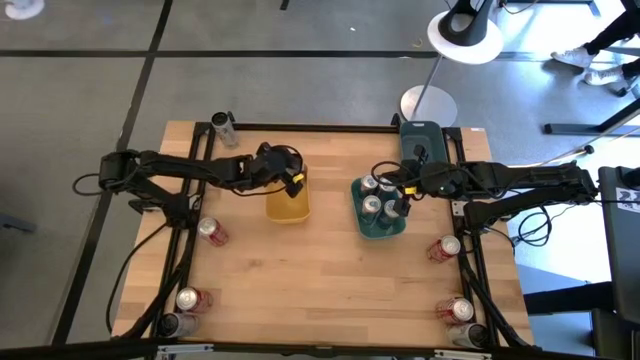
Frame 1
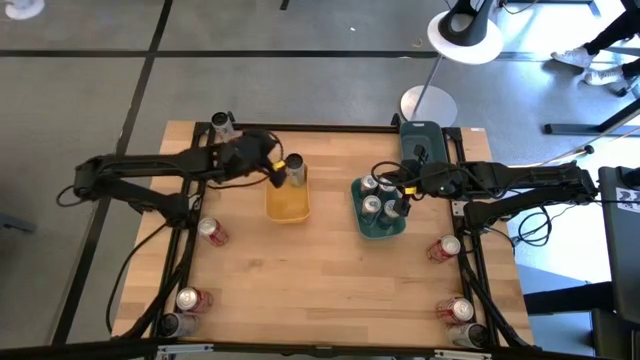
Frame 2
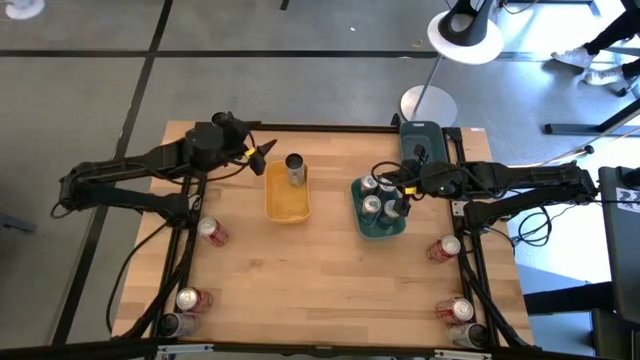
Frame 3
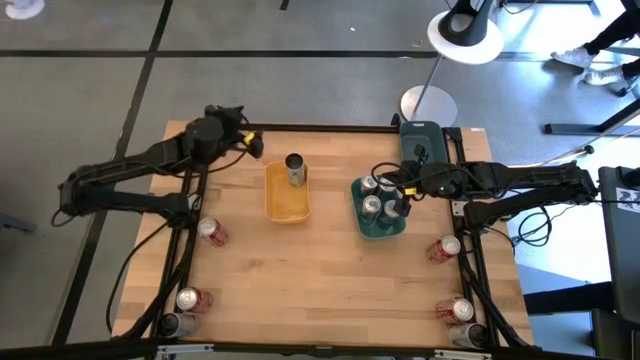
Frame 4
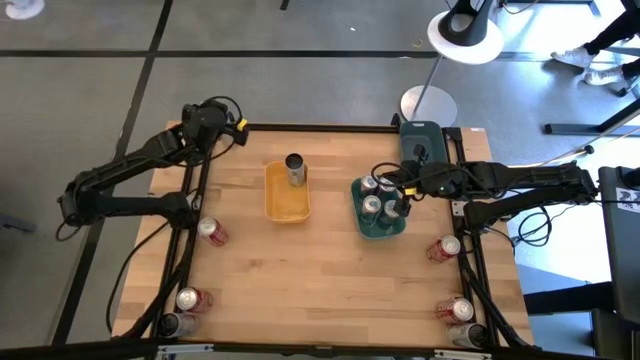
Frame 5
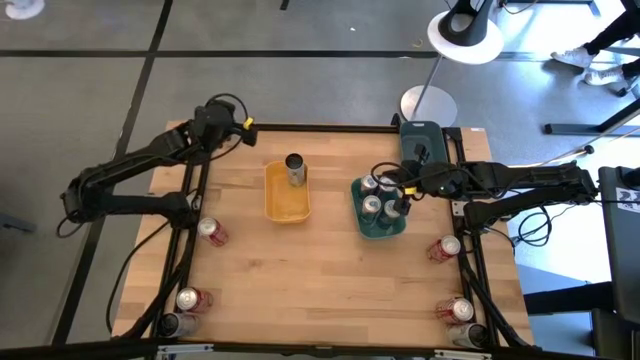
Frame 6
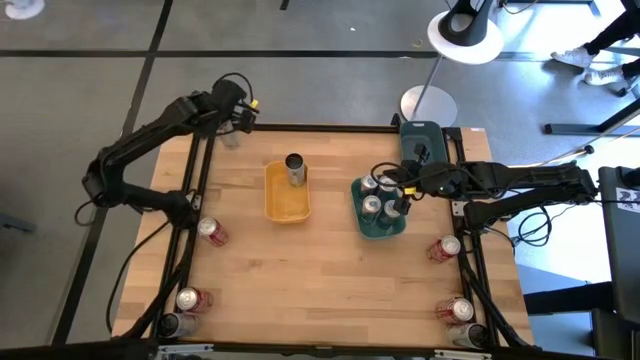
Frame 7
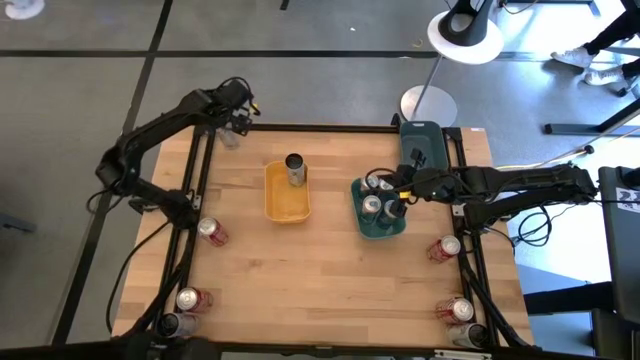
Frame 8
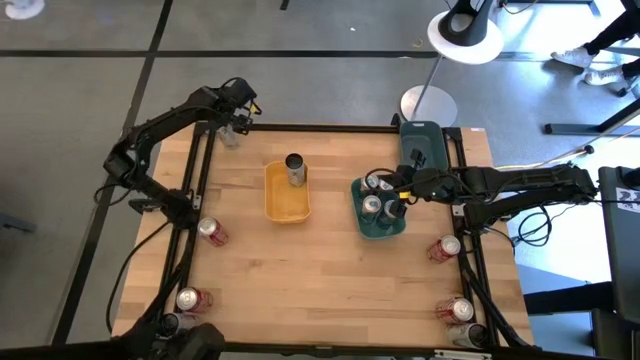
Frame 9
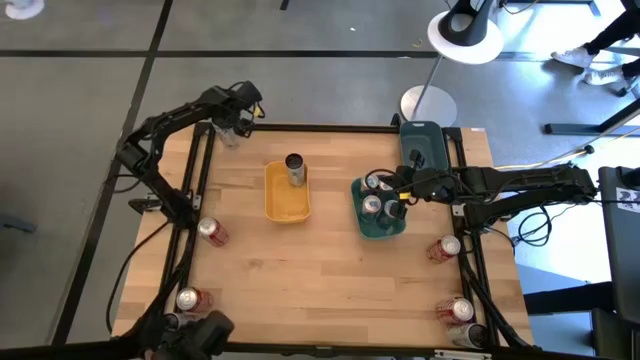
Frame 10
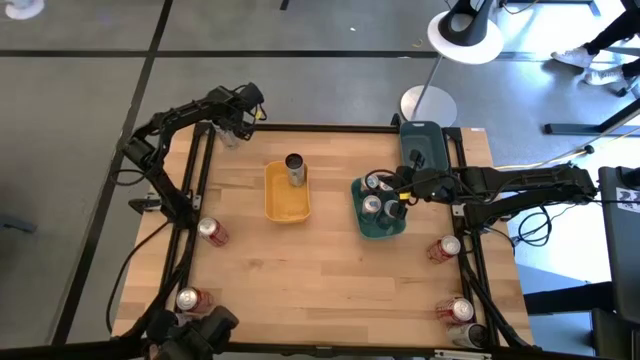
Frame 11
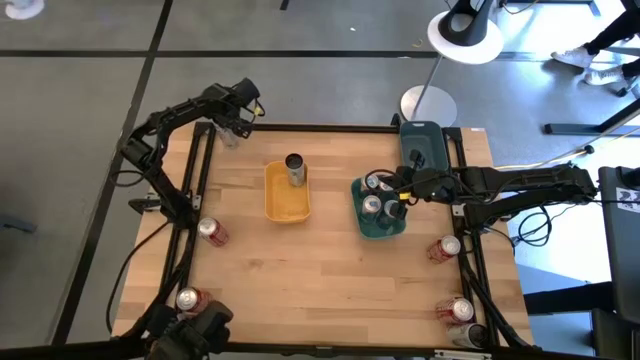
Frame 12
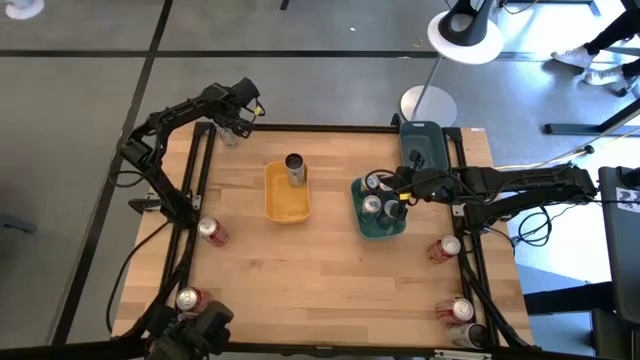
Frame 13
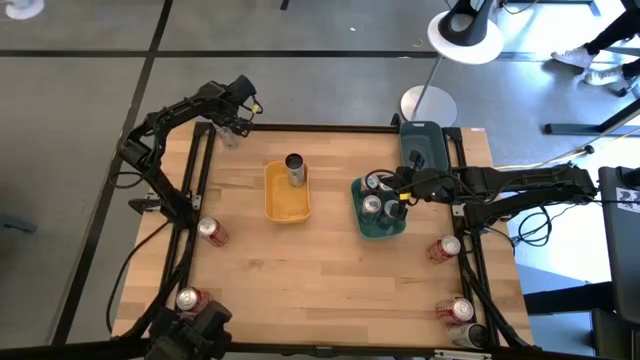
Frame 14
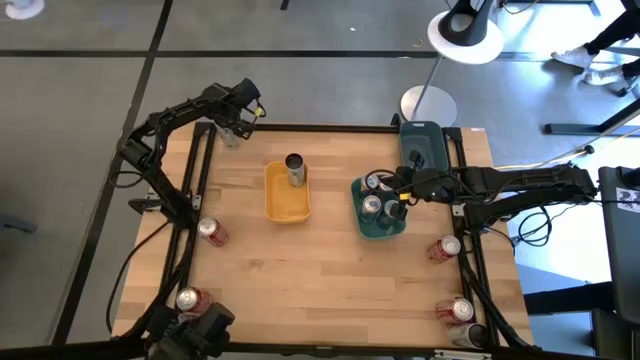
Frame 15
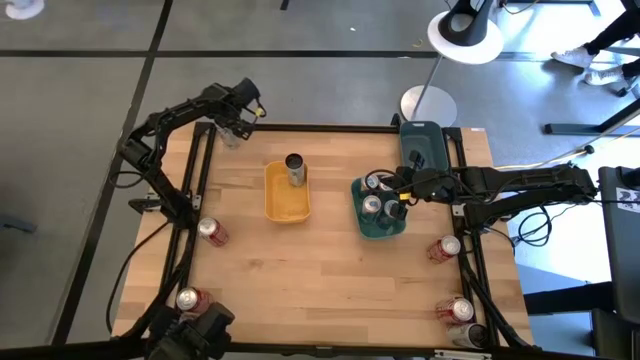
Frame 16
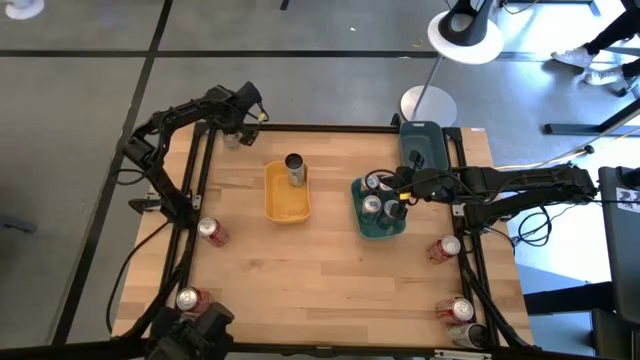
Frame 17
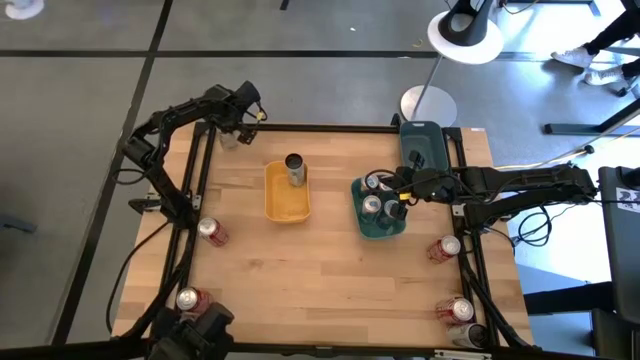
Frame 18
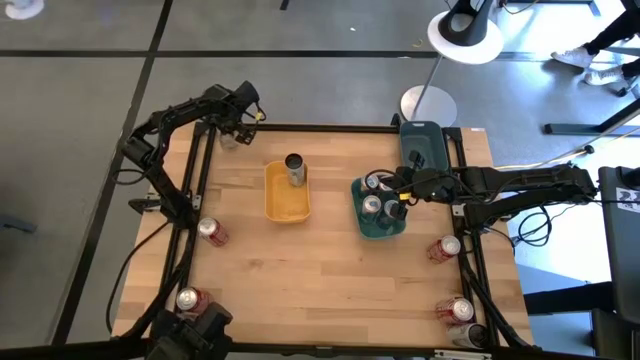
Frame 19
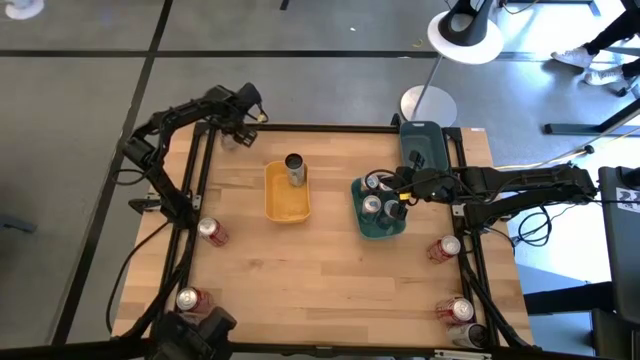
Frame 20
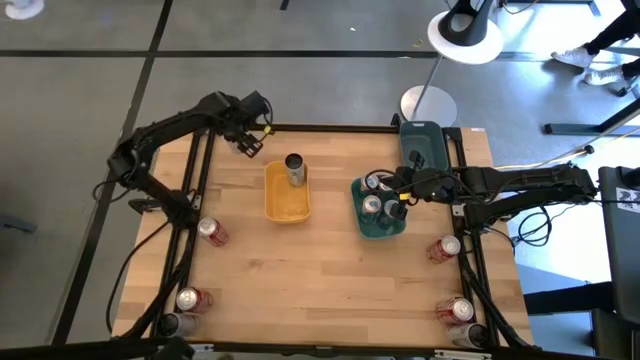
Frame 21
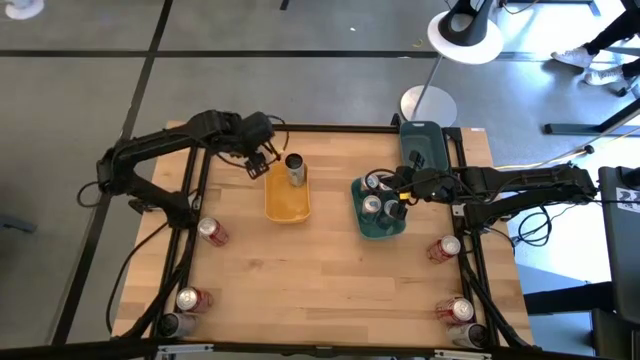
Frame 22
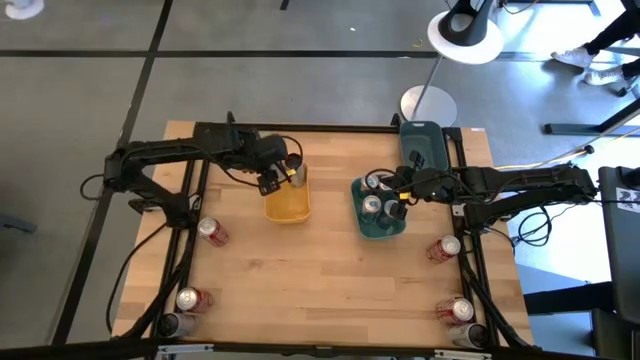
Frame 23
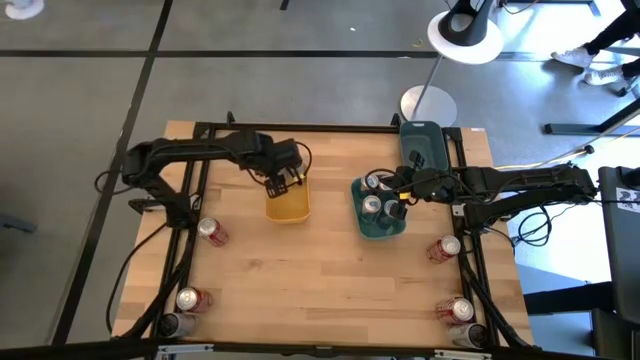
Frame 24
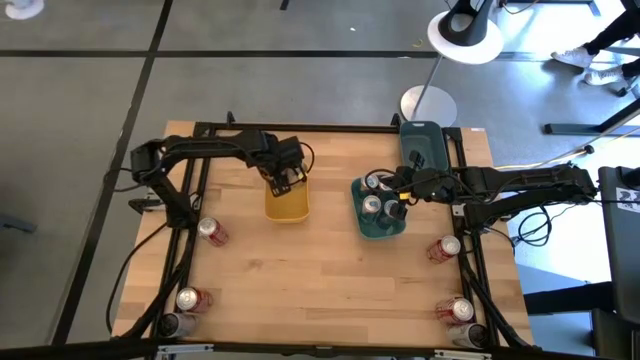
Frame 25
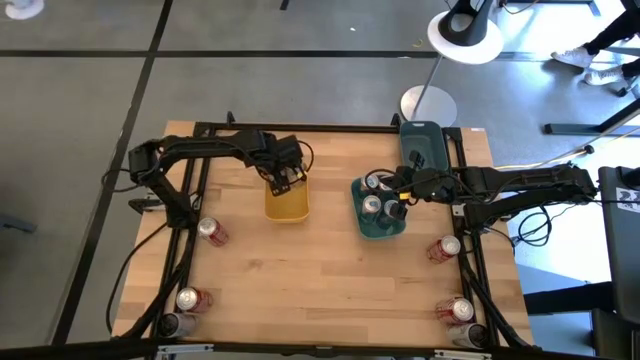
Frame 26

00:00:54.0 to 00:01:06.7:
Task: Sort soda cans
Put the top white-pink soda can into the yellow bin

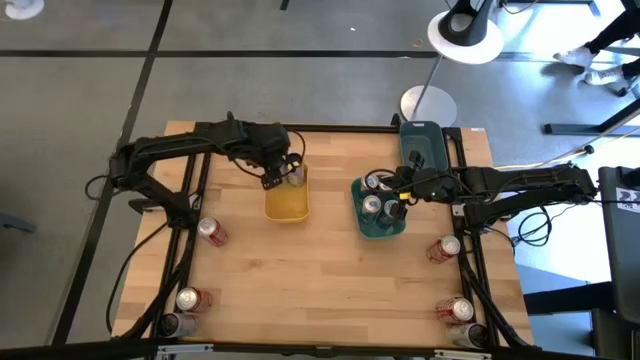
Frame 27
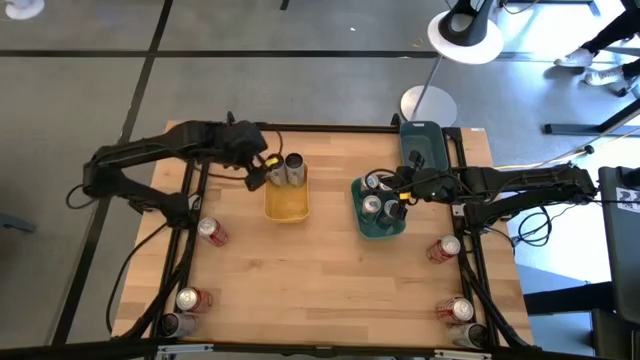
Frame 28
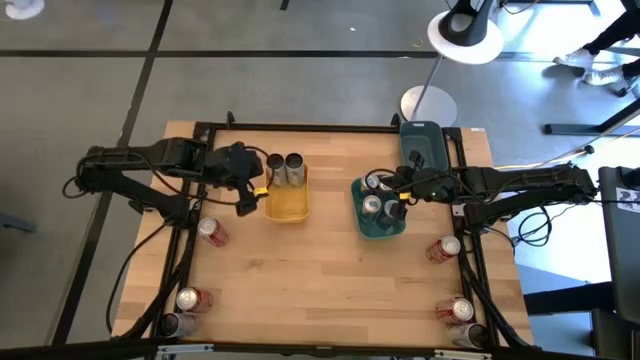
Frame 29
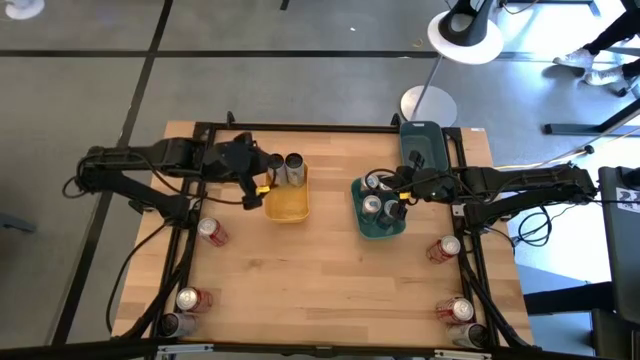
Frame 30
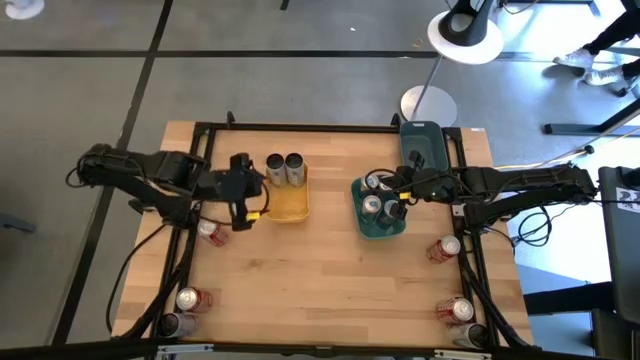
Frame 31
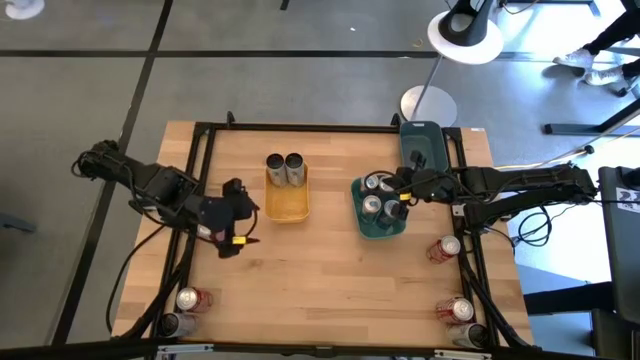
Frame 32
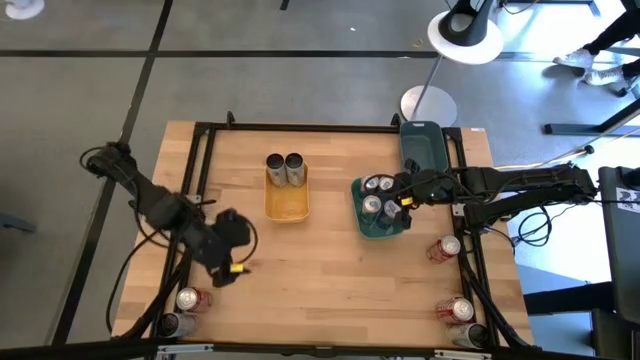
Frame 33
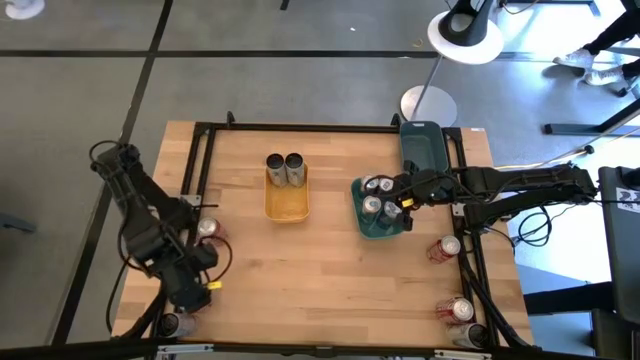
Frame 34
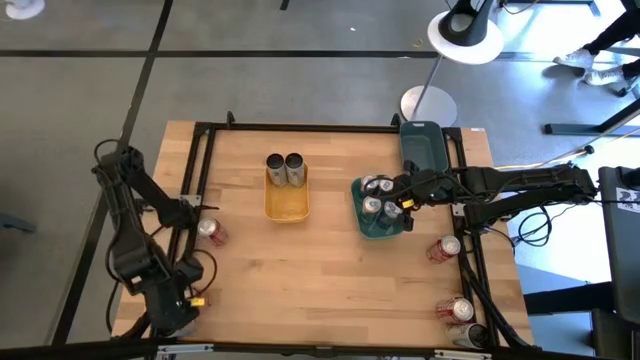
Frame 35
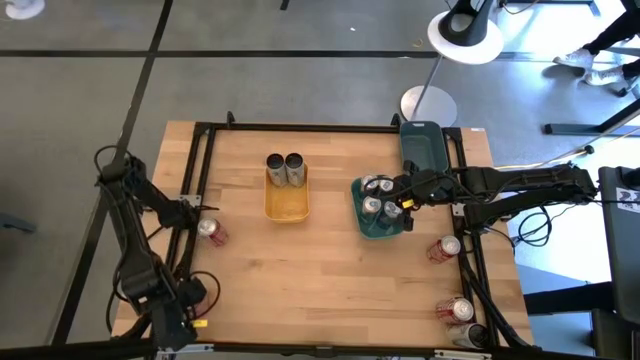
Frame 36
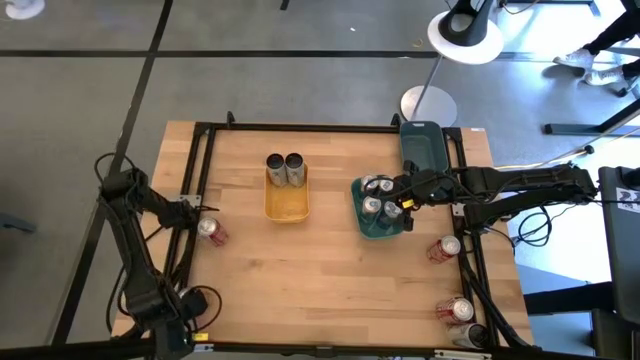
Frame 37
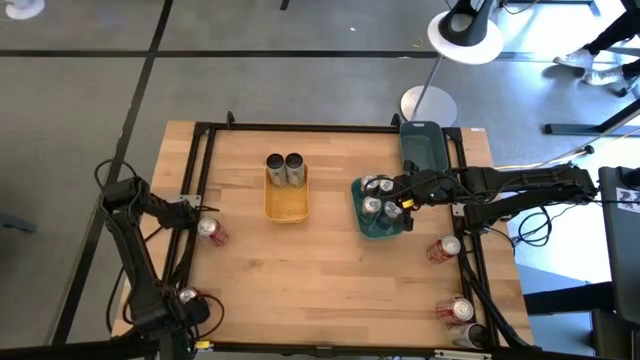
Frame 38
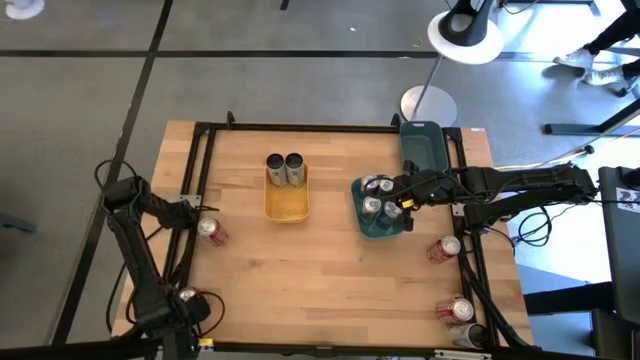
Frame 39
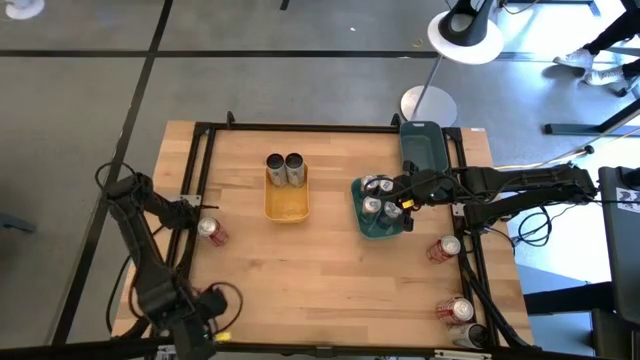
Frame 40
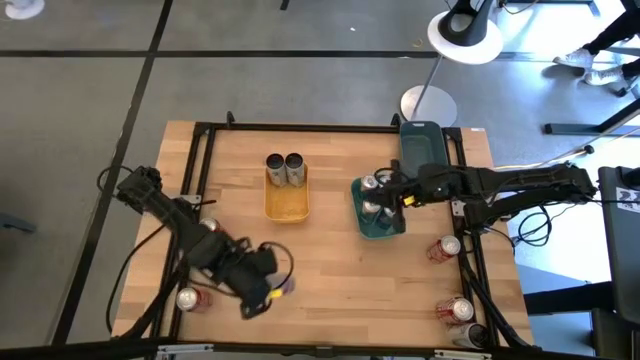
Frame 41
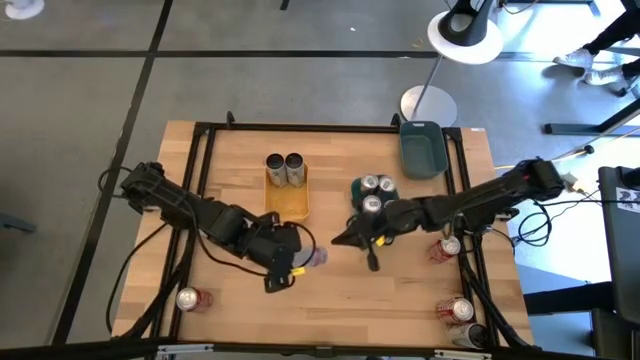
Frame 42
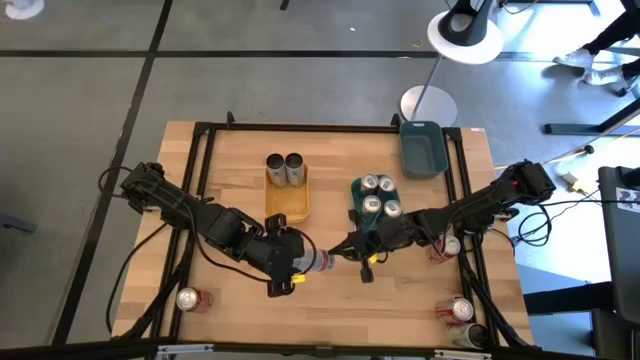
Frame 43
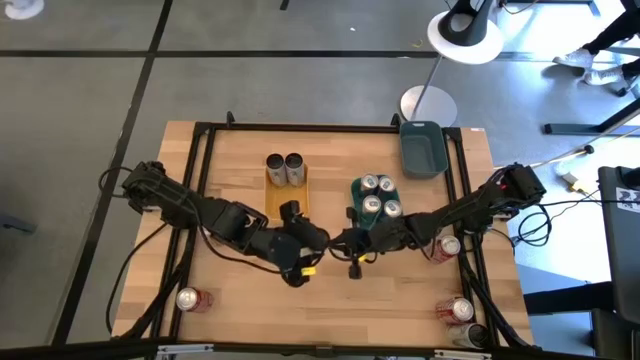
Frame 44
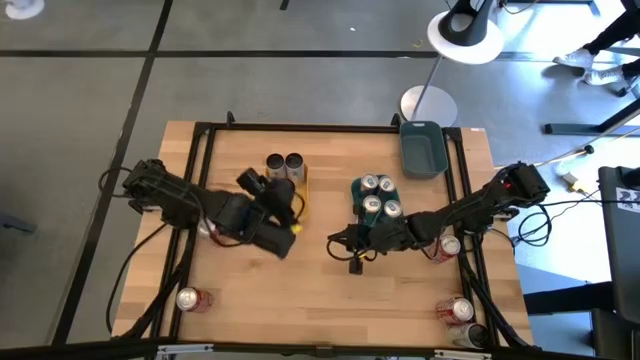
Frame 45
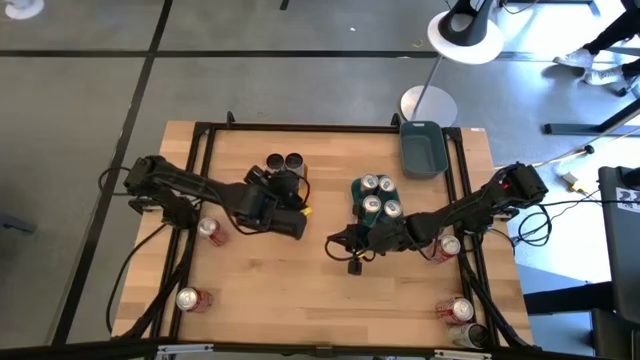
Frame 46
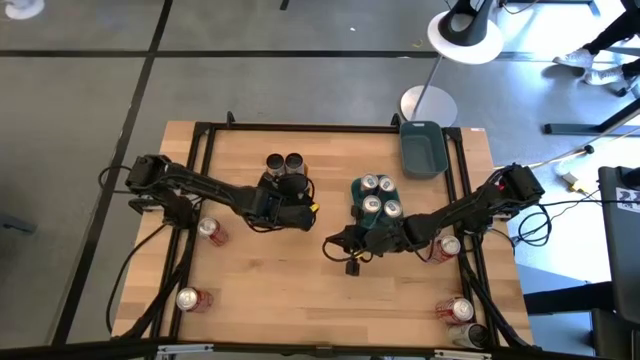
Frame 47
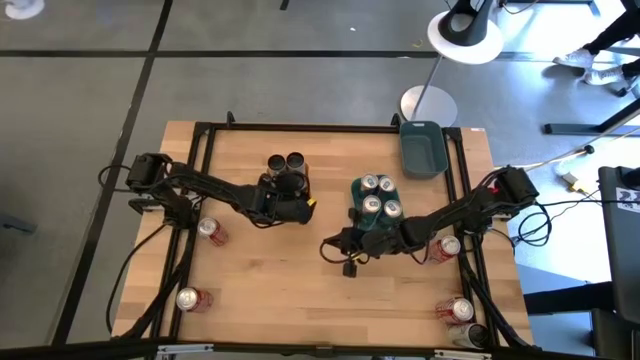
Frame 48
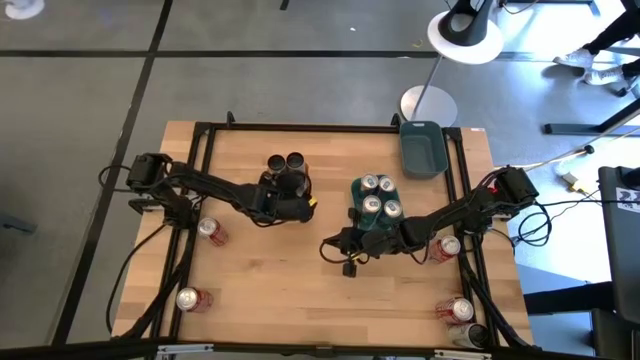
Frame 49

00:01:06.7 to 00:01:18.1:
Put the left white-pink soda can into the yellow bin
